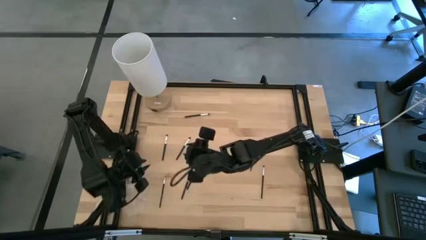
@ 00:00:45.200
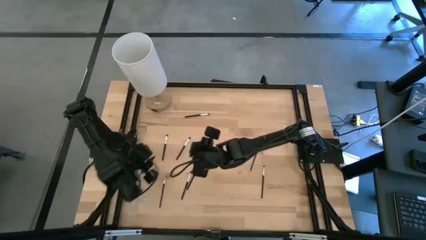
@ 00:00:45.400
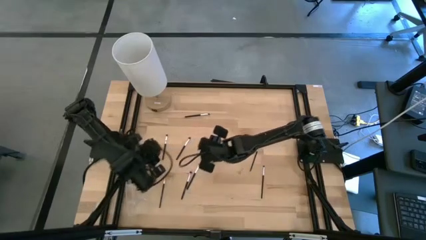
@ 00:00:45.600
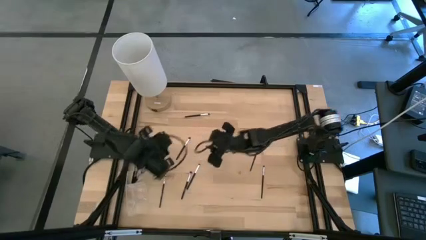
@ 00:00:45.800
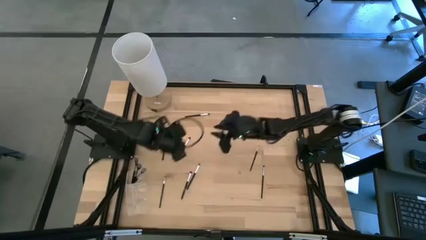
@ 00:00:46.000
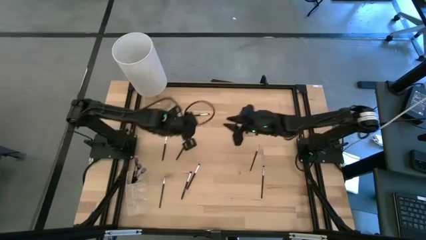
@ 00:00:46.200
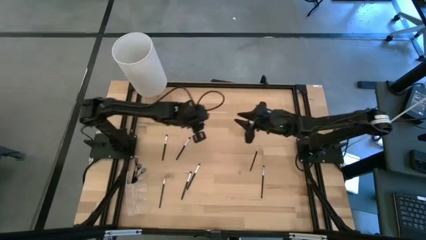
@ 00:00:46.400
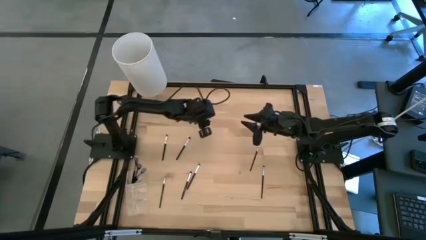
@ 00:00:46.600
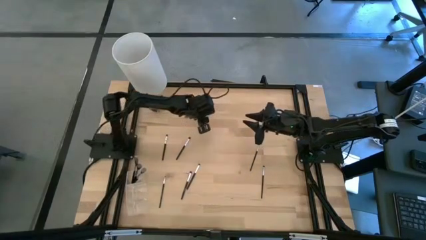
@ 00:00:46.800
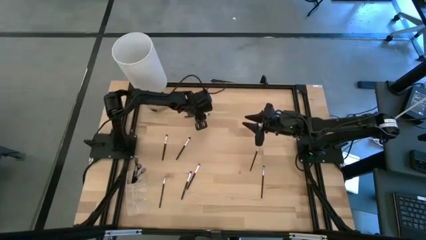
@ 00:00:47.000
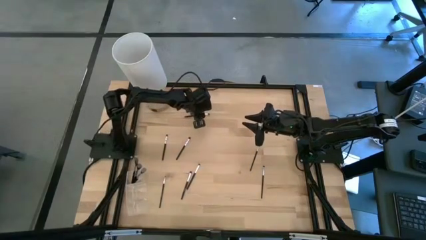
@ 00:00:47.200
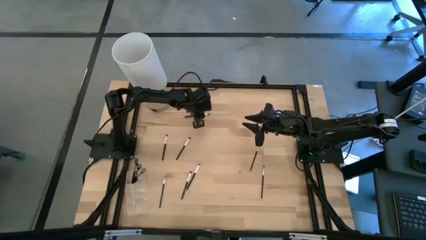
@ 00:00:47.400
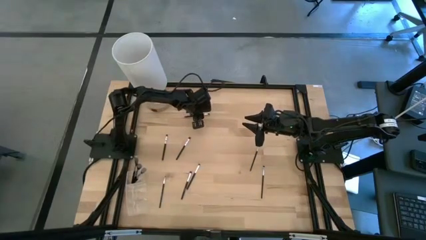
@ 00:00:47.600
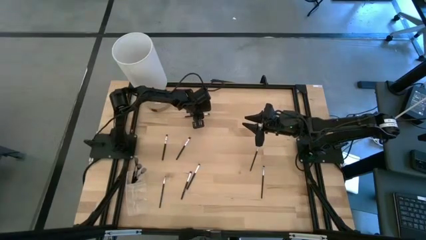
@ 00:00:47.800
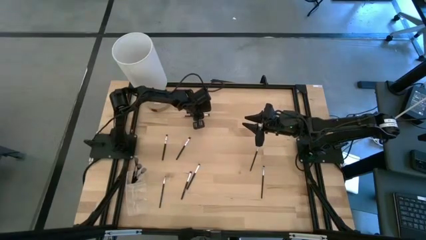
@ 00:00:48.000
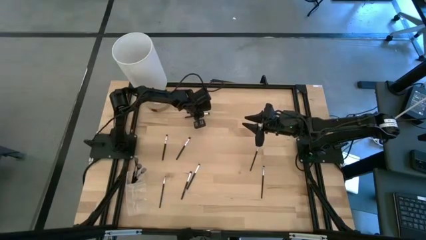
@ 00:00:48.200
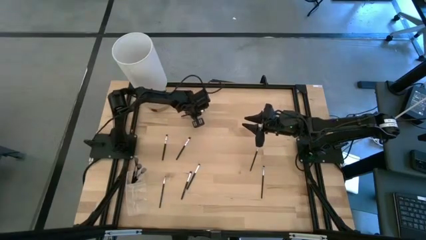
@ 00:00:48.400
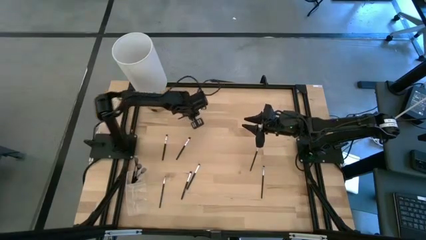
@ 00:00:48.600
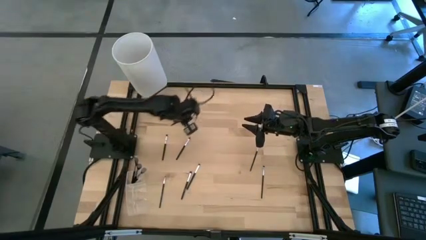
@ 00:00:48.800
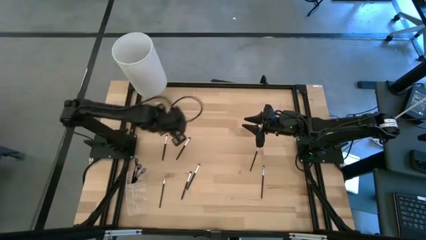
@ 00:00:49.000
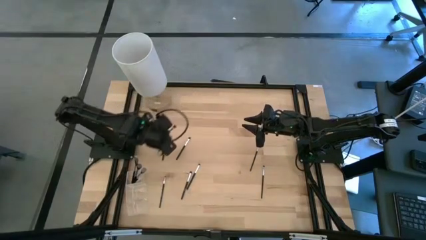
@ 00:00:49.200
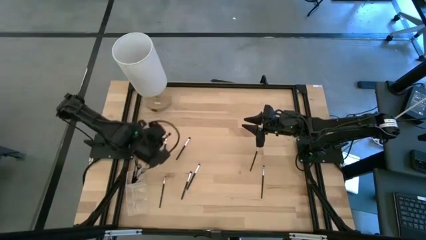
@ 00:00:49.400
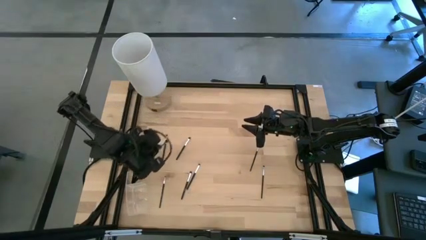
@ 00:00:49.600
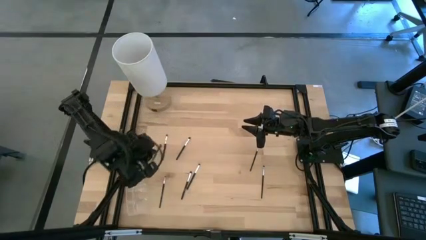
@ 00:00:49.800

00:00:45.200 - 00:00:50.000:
Task: Pick & Place Makeup Supplies
Put the makeup brush into the transparent organizer

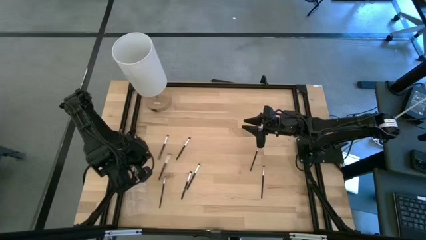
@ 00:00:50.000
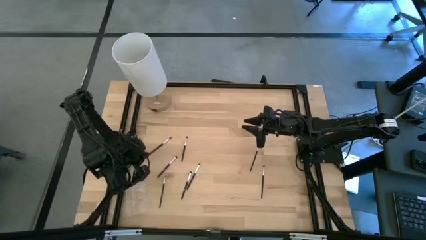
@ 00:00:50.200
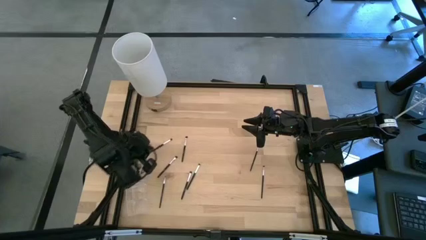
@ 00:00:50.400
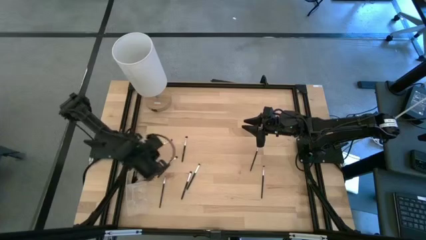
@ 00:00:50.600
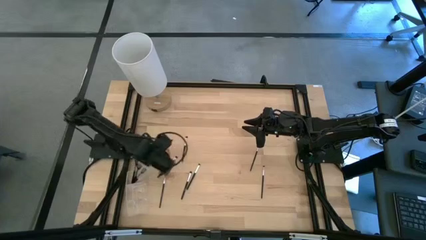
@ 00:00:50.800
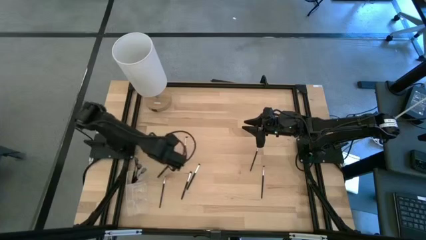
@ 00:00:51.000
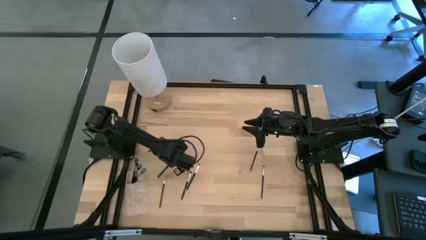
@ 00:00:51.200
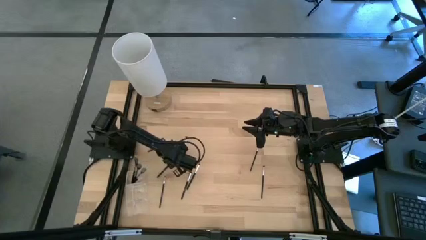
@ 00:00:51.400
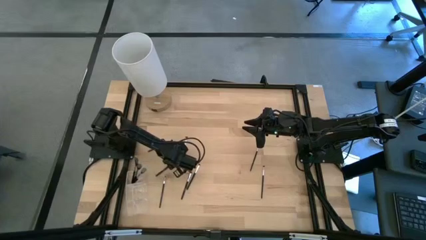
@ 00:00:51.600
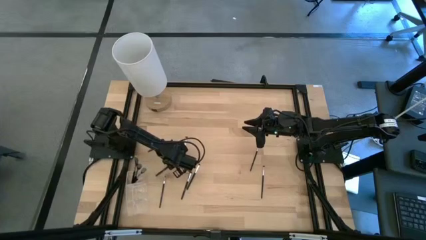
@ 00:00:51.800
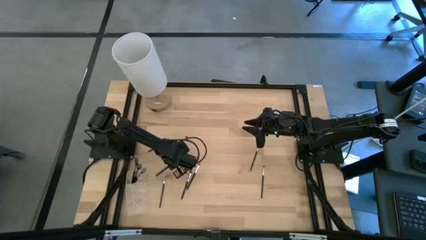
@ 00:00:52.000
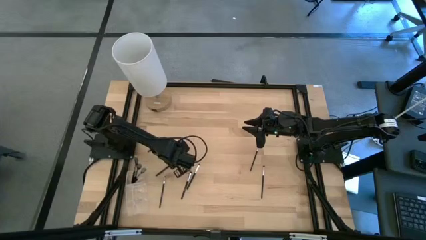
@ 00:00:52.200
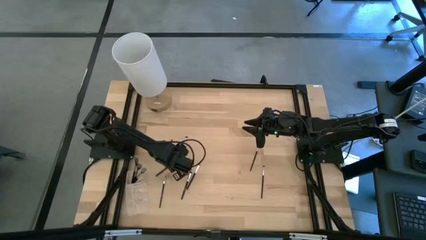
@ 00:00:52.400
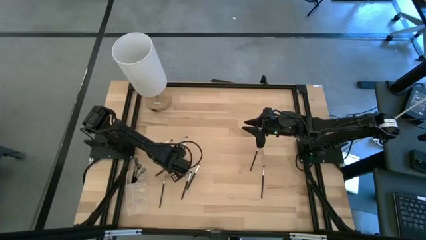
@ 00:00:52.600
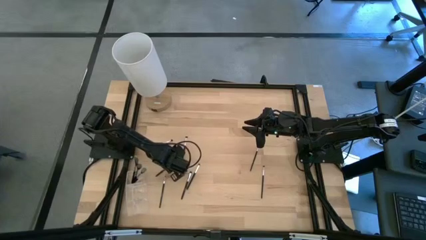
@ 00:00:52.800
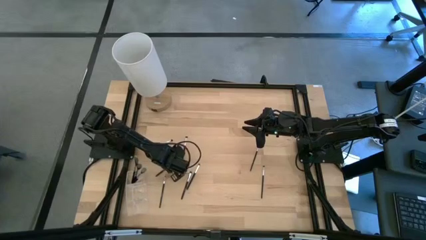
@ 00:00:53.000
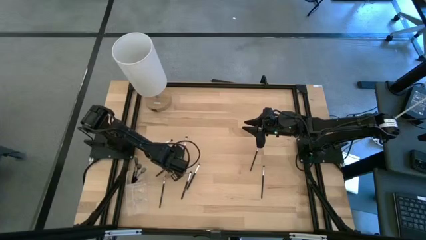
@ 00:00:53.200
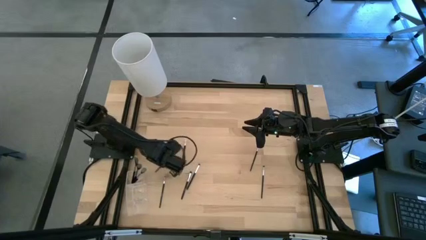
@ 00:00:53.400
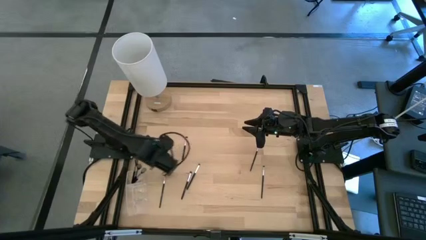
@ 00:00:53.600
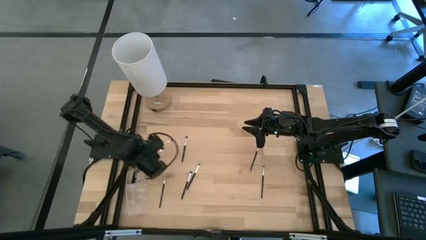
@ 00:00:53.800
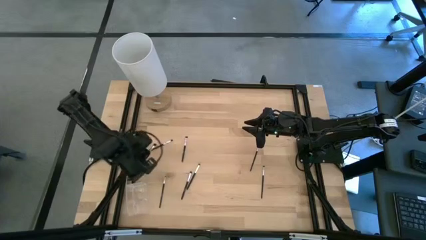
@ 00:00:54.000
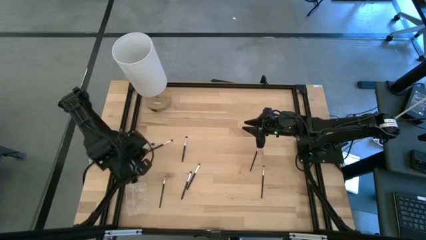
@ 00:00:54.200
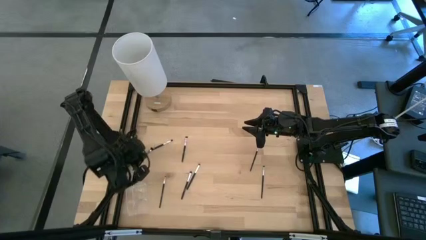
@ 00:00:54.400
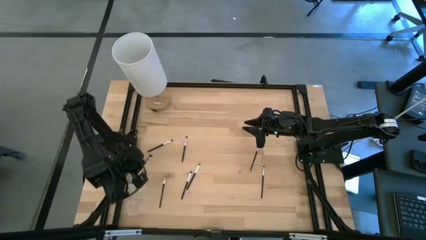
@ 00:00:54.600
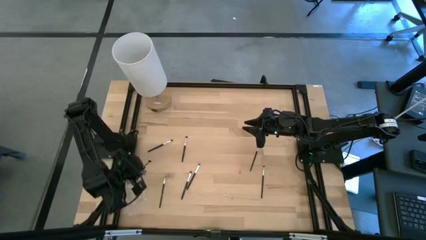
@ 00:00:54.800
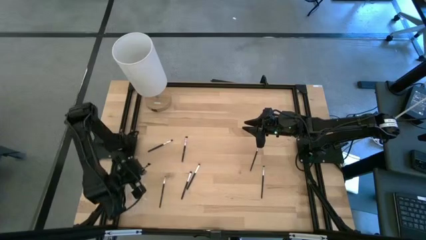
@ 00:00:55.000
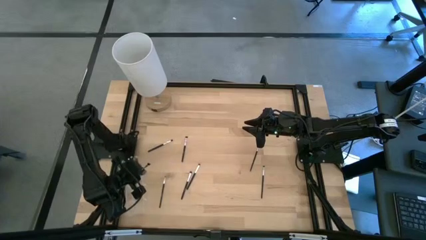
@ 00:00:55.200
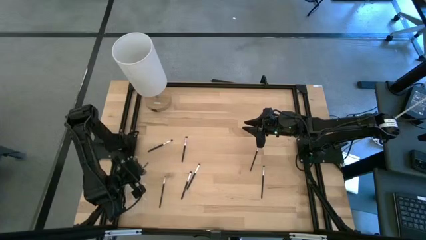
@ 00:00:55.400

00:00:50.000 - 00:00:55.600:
Put the makeup brush into the transparent organizer

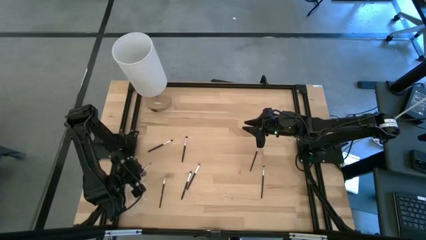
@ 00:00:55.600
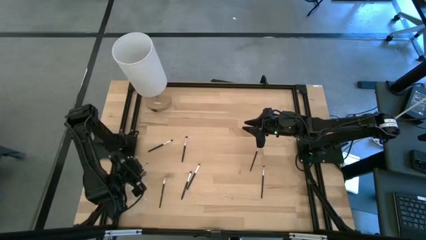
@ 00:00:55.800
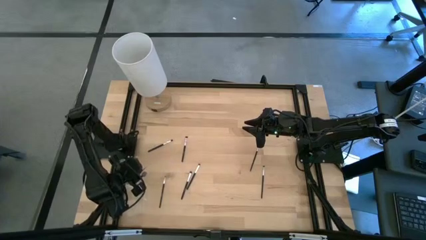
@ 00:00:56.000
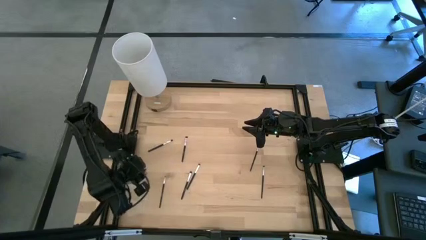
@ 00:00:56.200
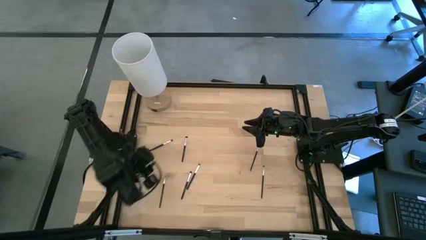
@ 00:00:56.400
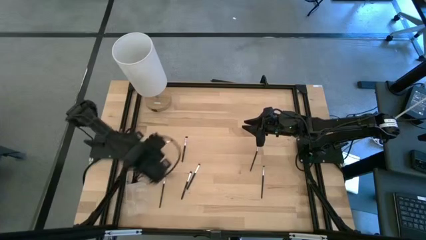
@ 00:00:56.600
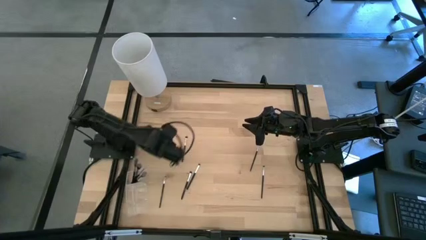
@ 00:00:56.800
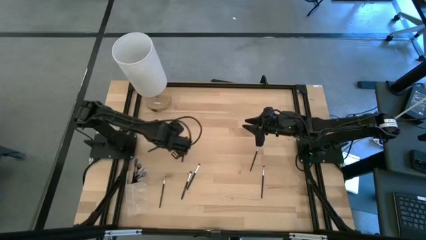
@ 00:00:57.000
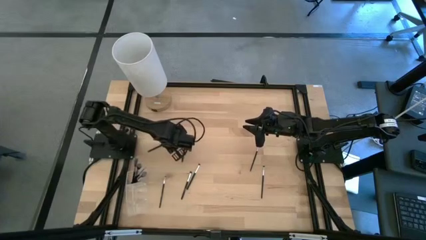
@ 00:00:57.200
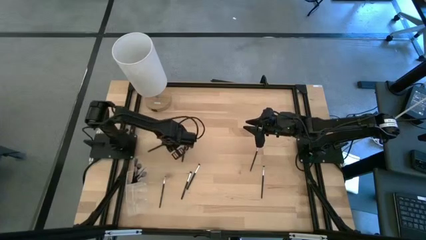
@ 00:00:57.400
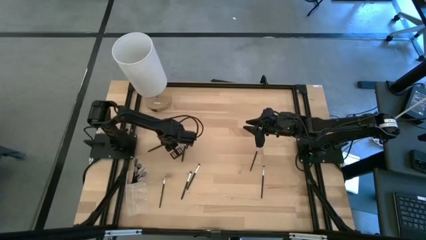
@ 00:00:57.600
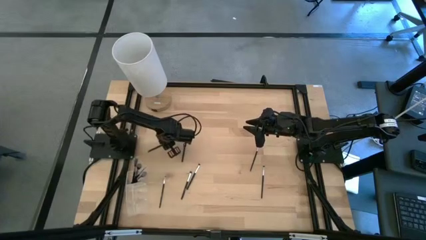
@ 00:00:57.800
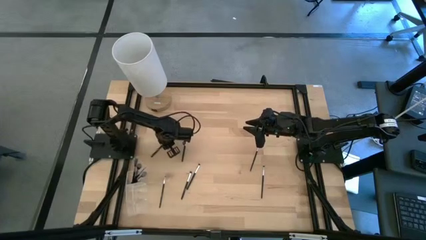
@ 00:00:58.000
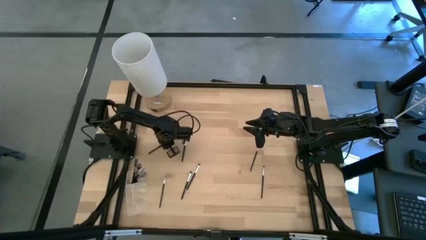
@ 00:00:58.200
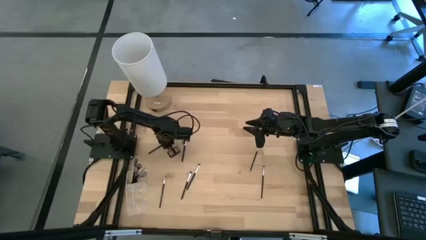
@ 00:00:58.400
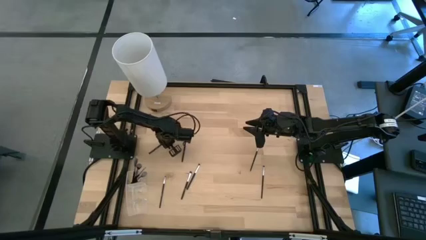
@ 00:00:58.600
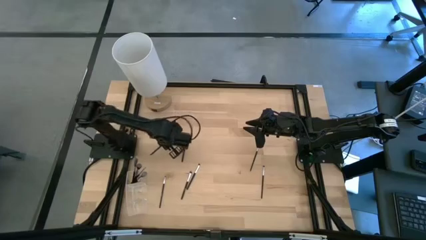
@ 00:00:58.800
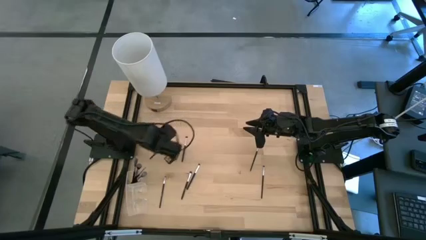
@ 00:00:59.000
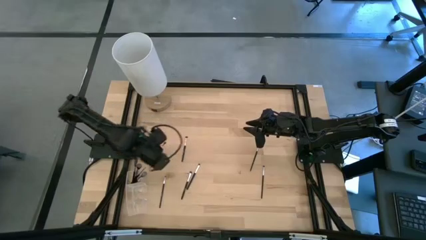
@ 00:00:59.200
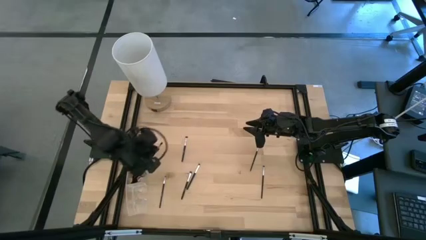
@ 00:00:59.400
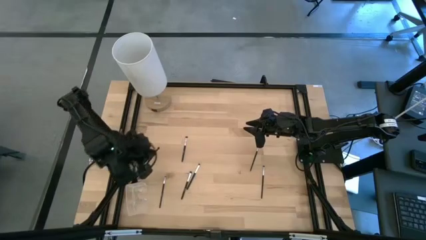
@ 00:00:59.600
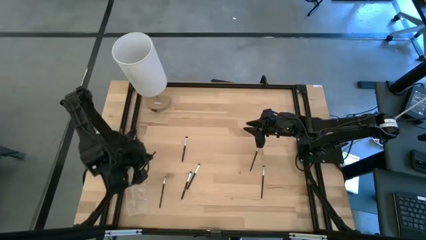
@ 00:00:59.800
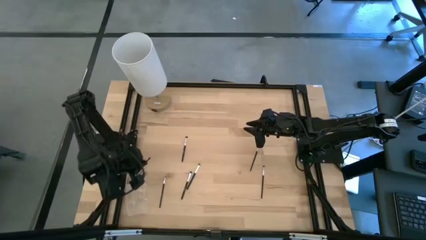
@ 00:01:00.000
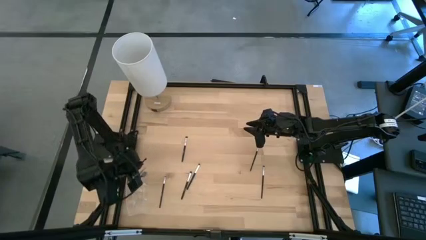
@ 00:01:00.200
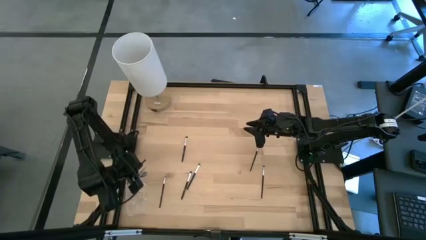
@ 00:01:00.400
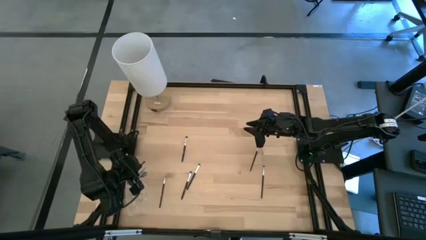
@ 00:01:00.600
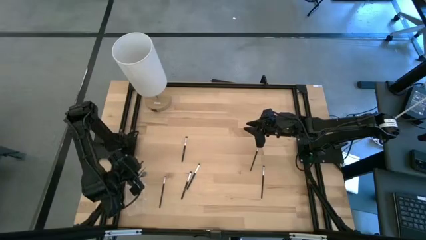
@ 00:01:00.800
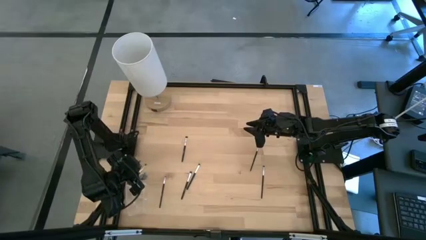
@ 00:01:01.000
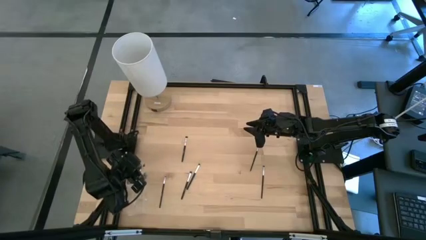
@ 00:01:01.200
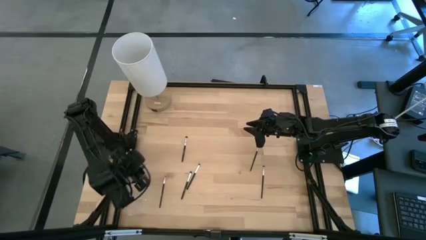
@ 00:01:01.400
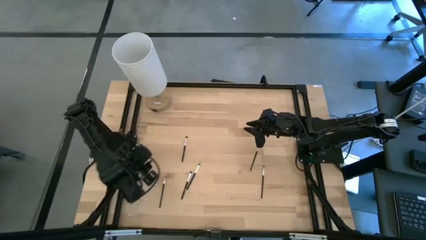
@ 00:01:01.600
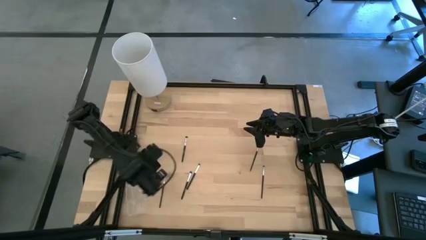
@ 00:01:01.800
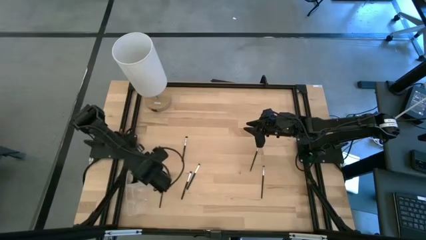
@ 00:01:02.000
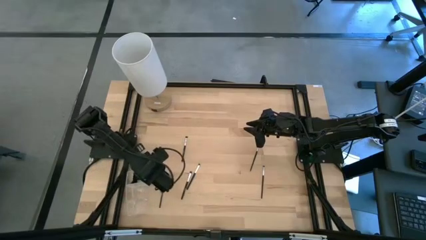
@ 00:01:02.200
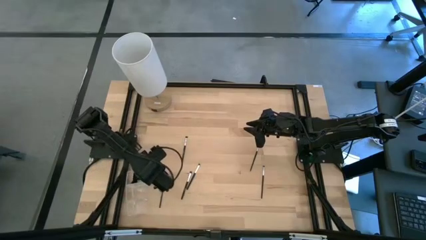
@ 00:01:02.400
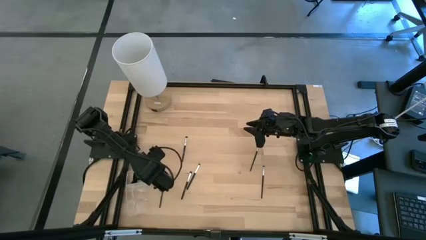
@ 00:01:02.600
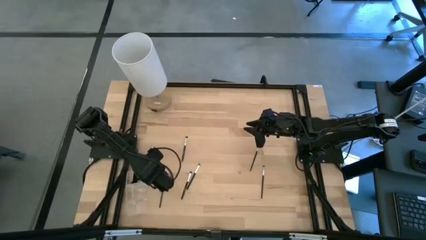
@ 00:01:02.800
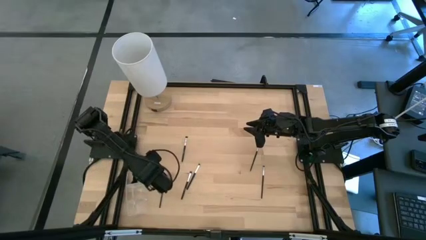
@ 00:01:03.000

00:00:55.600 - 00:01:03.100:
Put the makeup brush into the transparent organizer
